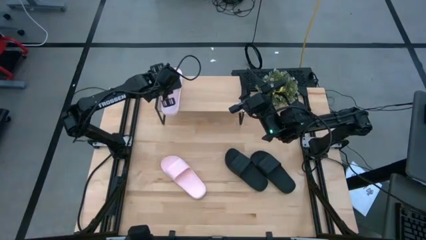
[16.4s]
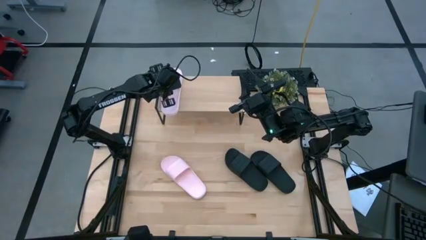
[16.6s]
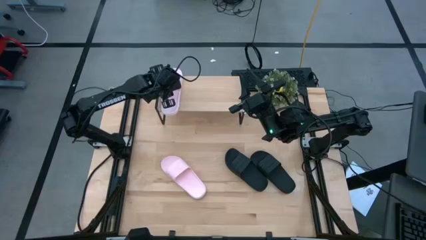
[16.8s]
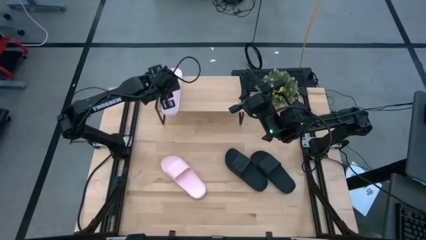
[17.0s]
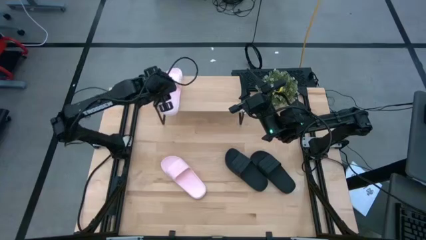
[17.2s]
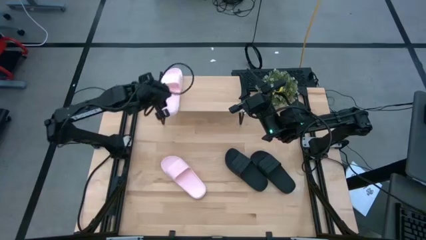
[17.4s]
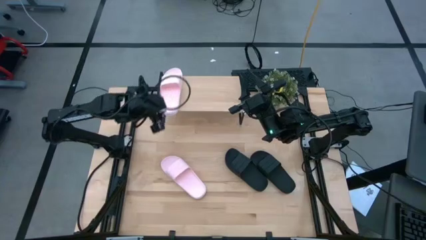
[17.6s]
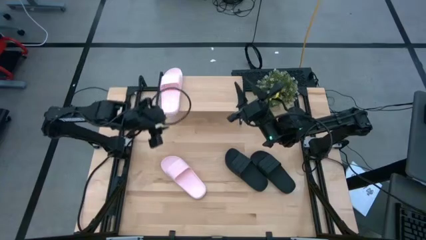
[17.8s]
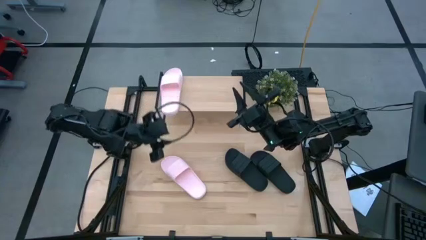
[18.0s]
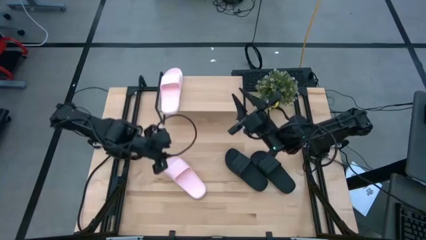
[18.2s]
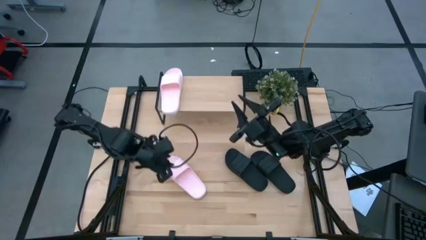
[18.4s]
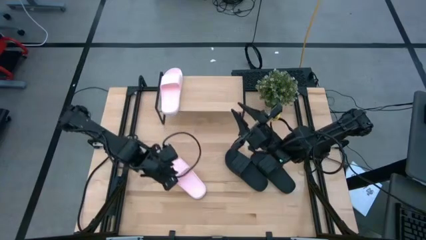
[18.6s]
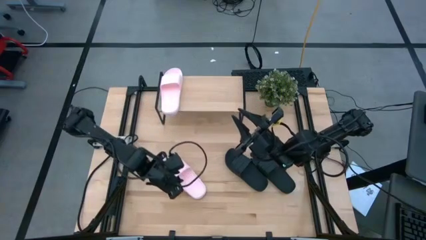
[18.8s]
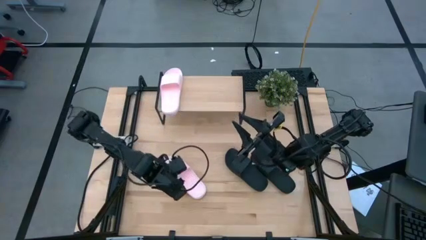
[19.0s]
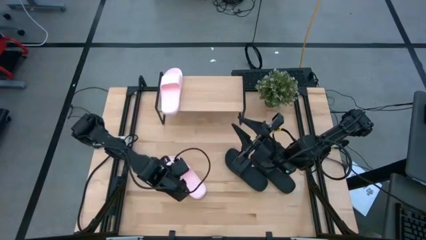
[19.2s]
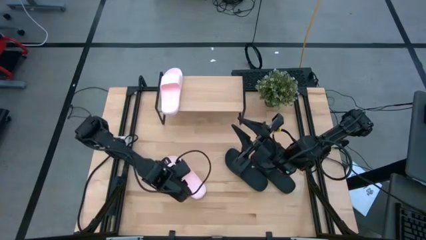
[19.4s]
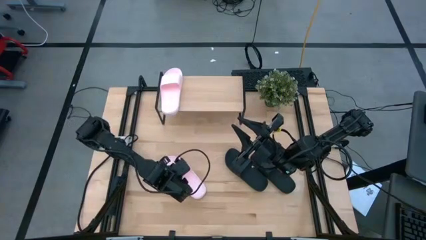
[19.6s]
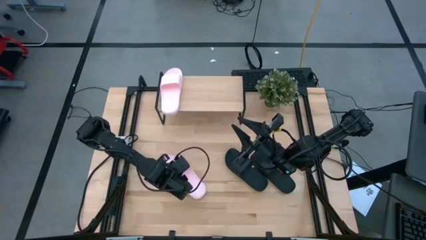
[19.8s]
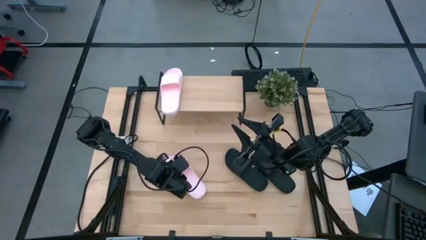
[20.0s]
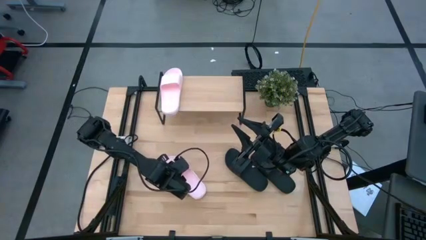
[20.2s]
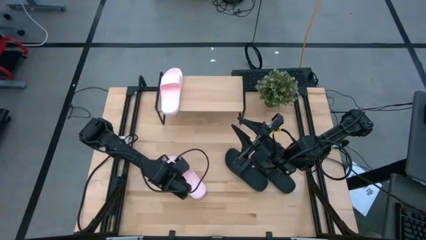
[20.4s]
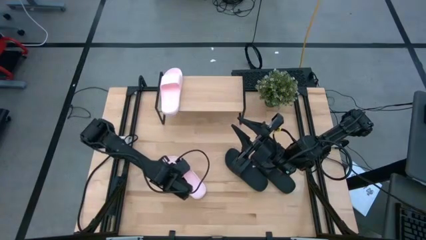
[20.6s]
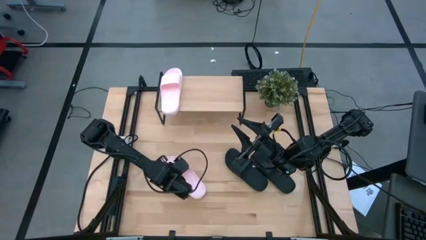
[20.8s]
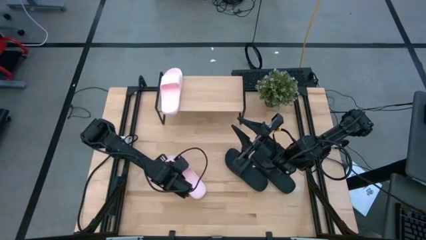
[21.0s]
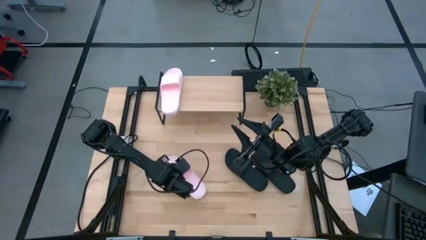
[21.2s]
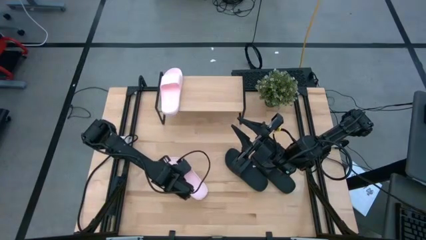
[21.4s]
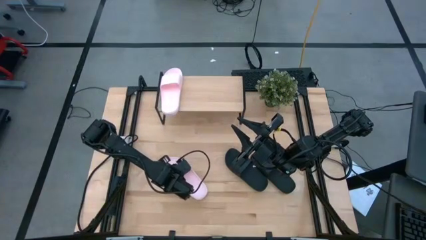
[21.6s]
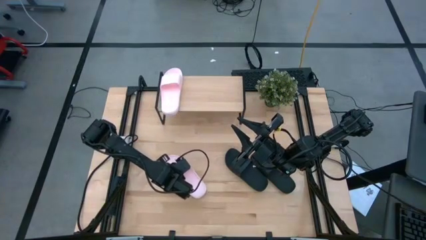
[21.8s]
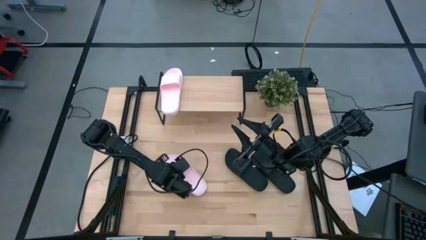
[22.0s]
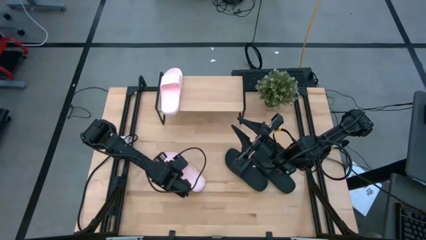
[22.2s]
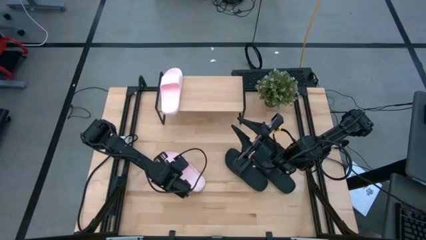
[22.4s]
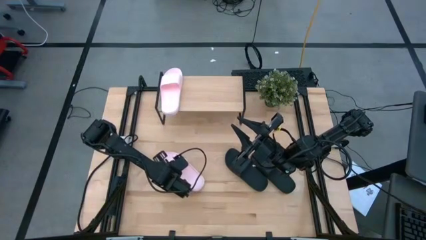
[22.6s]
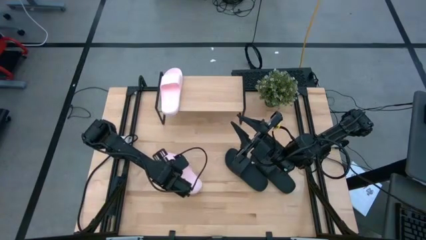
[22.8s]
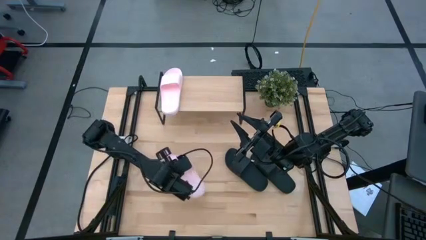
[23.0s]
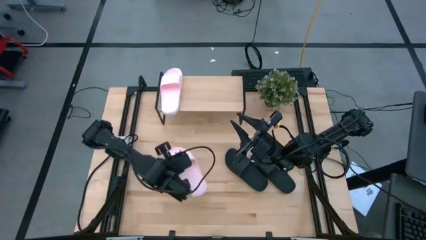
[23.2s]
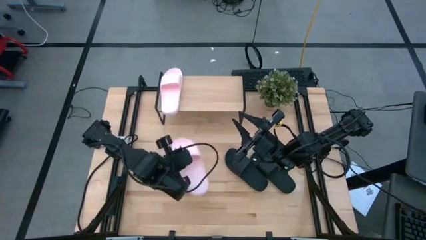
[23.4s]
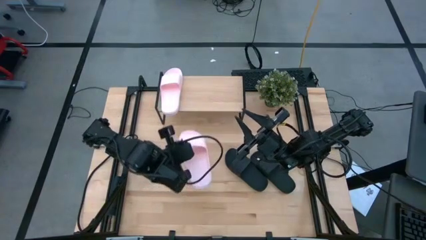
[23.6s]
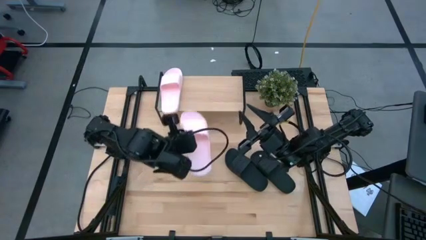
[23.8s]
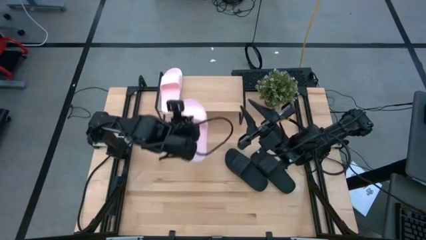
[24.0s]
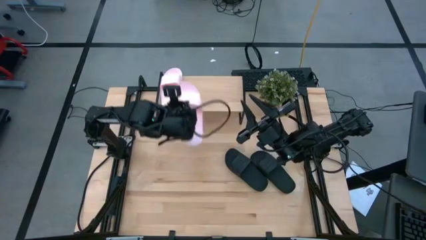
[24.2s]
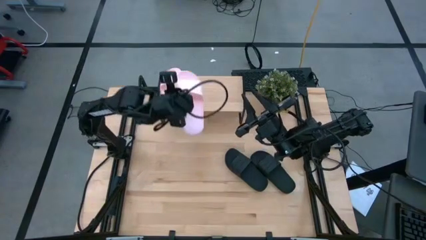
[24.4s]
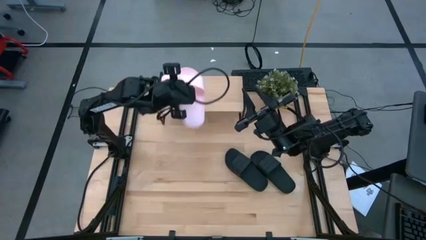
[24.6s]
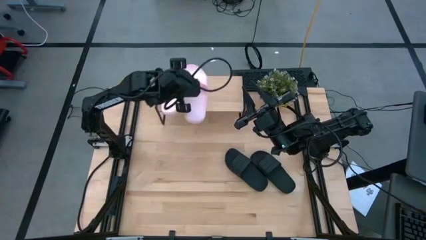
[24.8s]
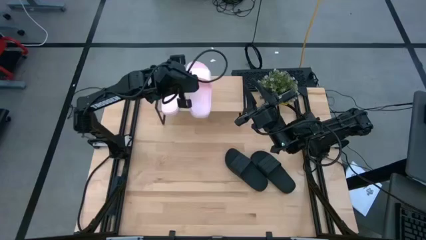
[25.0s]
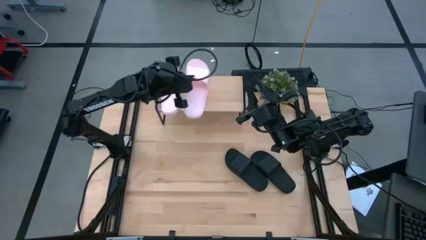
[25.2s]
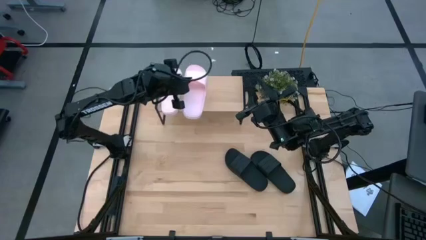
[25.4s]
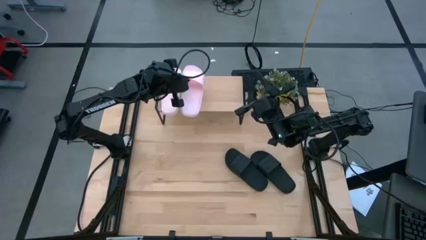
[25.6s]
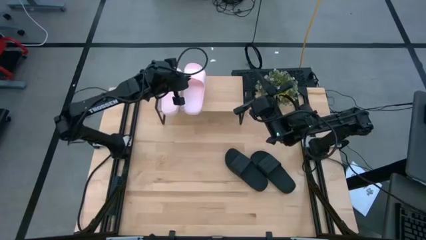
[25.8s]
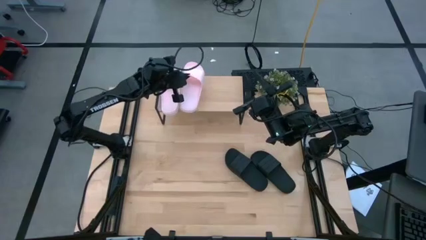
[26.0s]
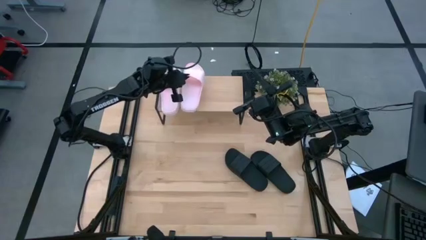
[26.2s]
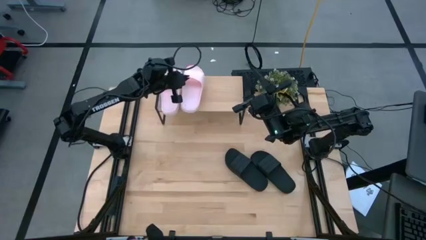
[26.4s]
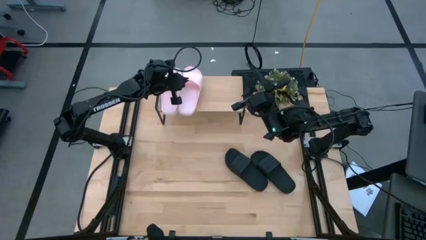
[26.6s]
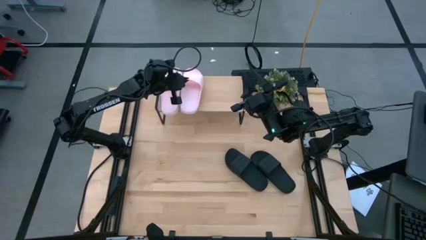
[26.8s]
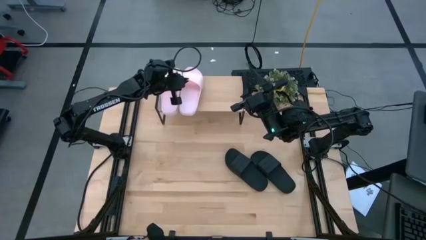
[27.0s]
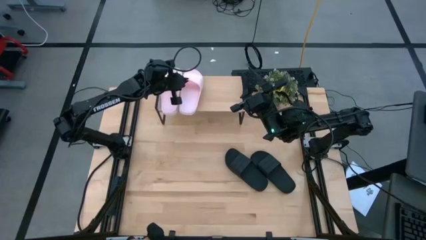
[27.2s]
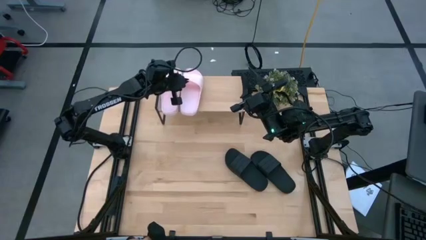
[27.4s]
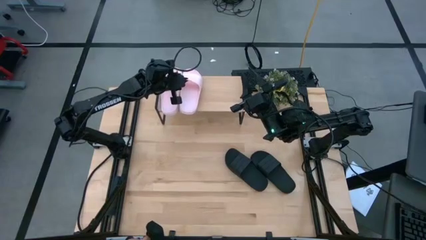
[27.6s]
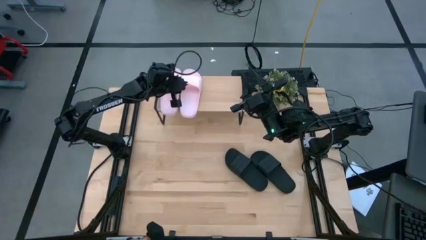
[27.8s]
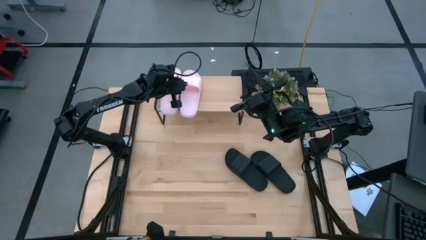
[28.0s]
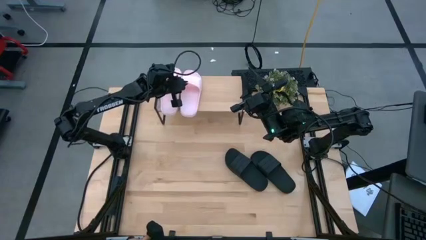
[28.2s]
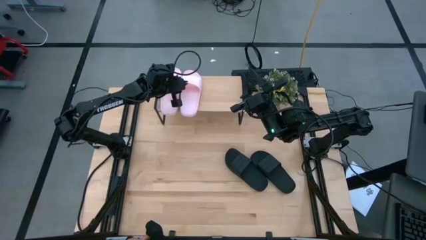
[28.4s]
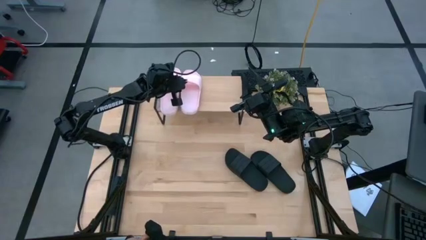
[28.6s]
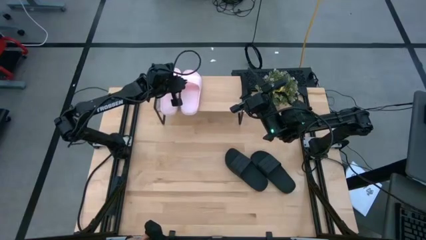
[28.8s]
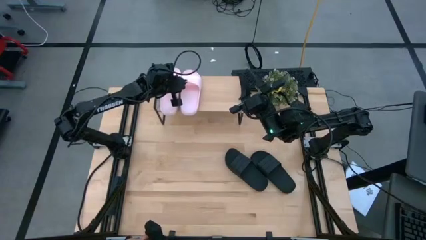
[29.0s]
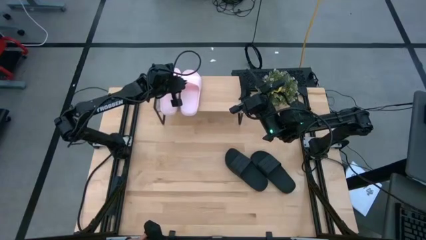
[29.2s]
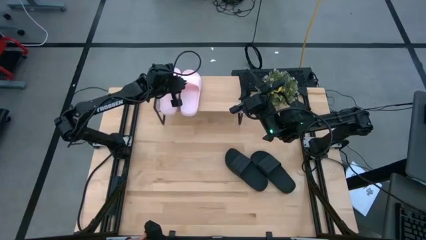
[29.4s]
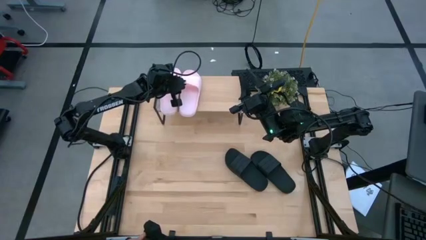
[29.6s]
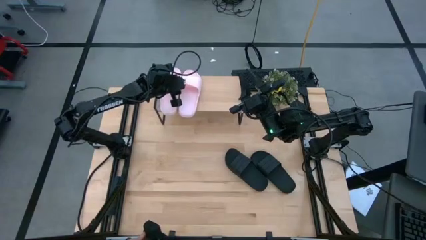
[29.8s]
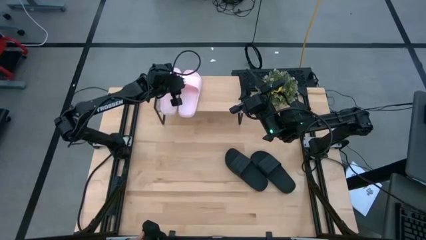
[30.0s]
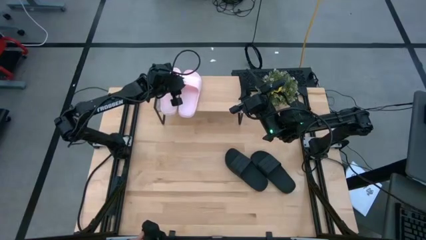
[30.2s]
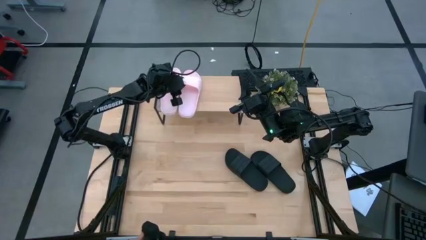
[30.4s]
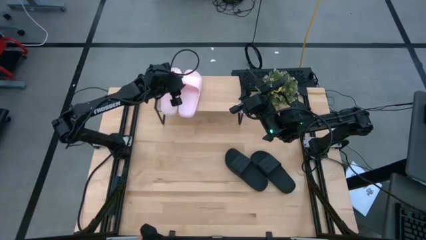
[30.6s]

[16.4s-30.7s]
Task: Pick and place slides into the shelf
Put the pink slide on the shelf
